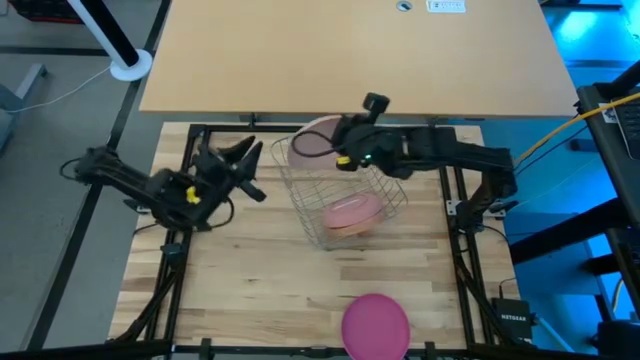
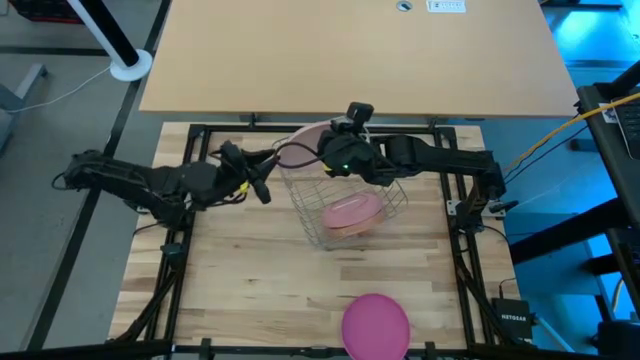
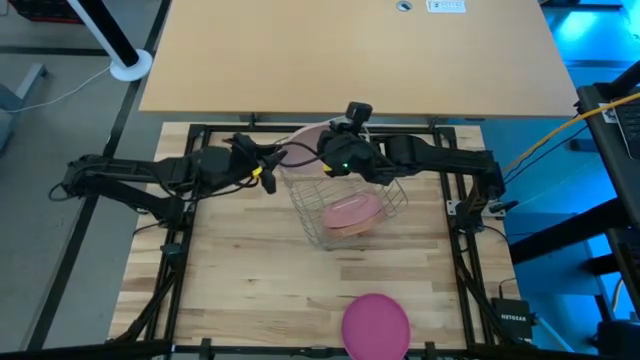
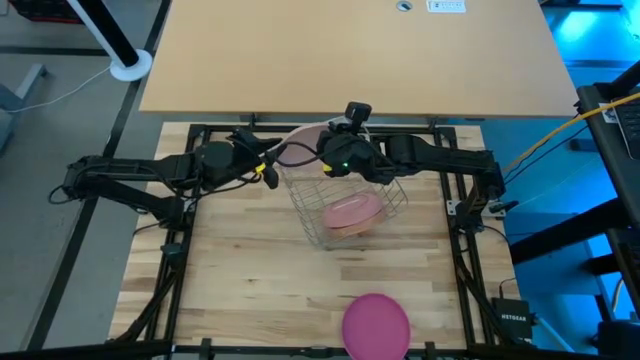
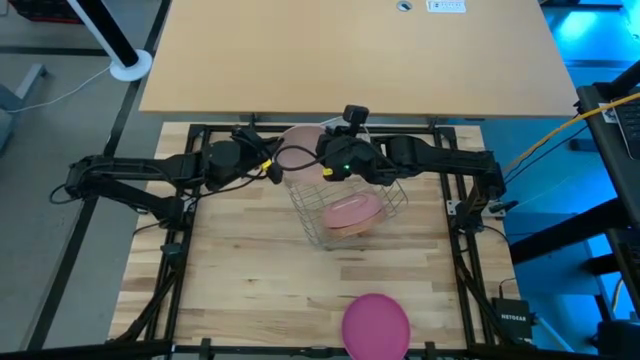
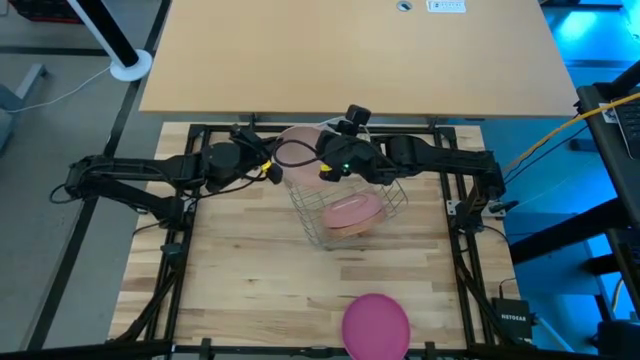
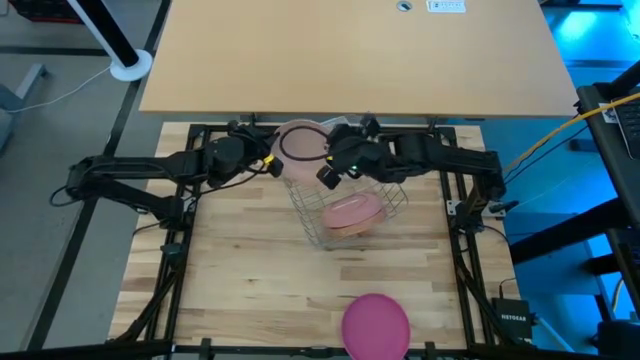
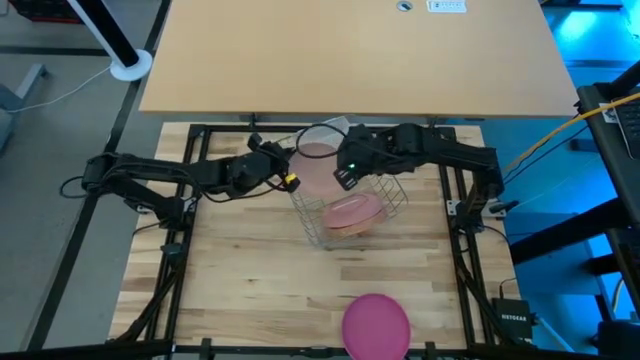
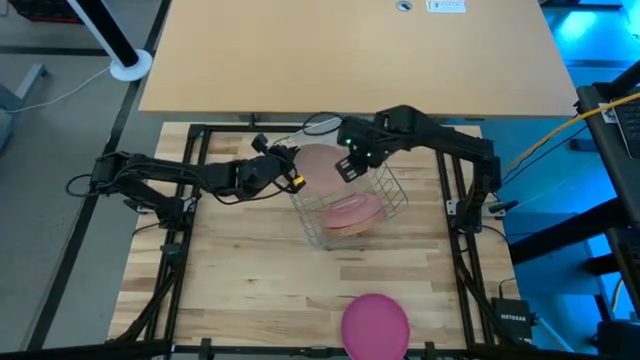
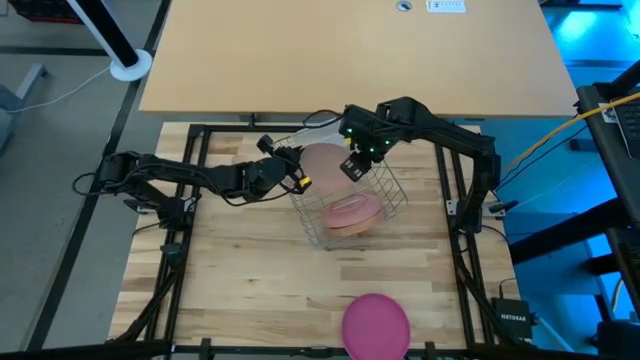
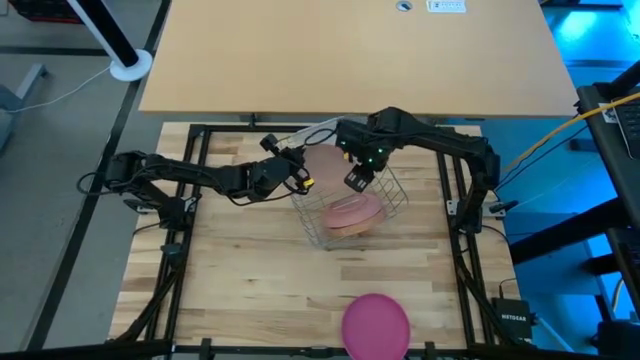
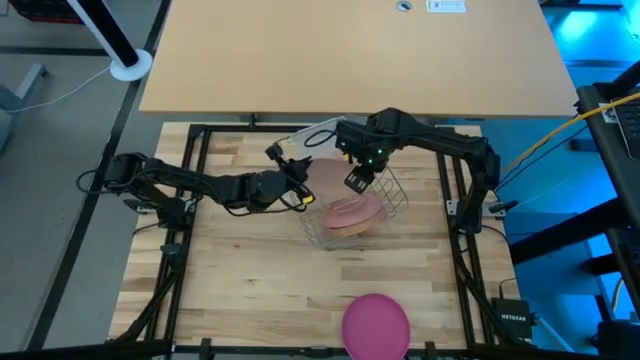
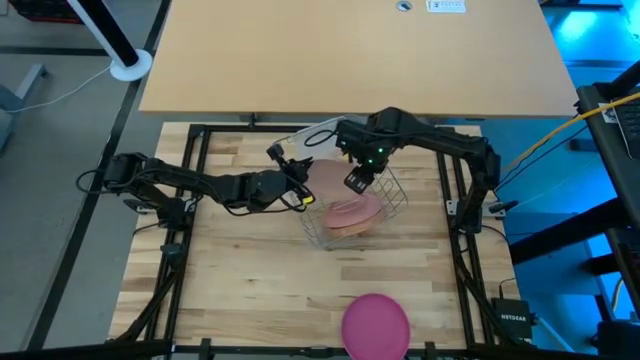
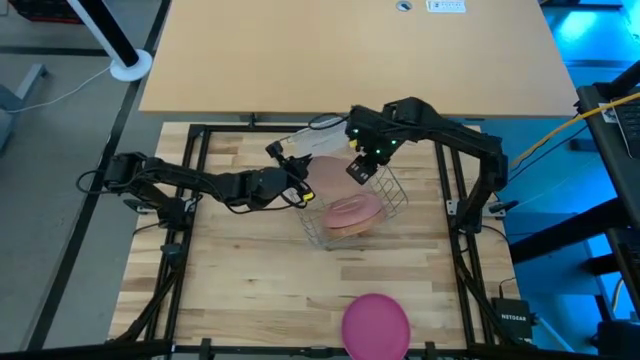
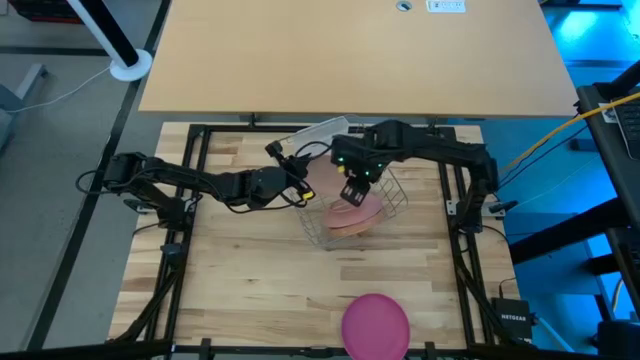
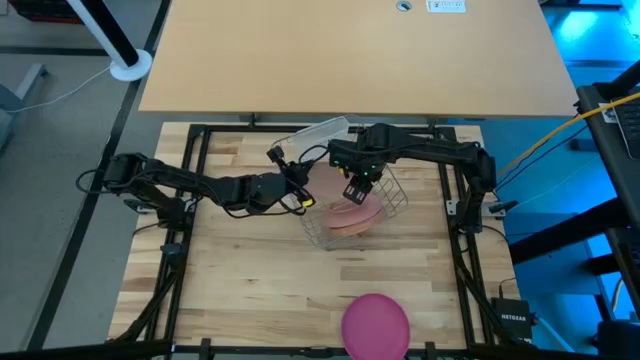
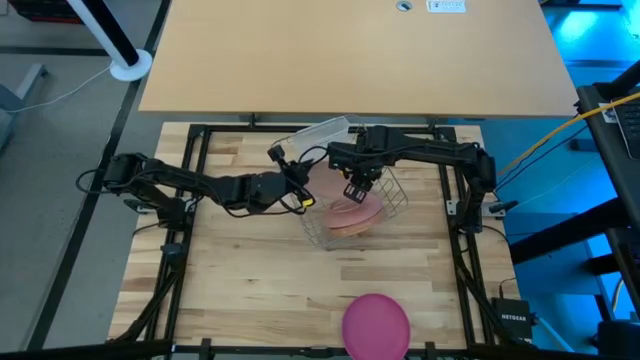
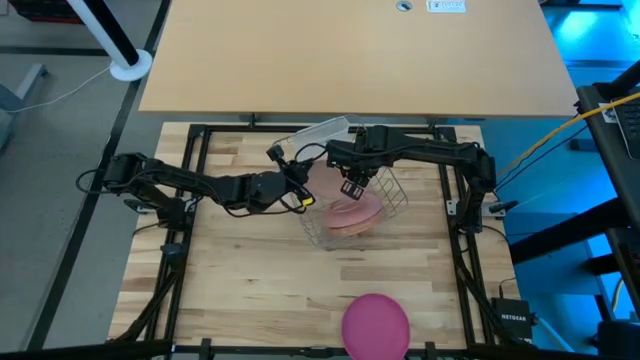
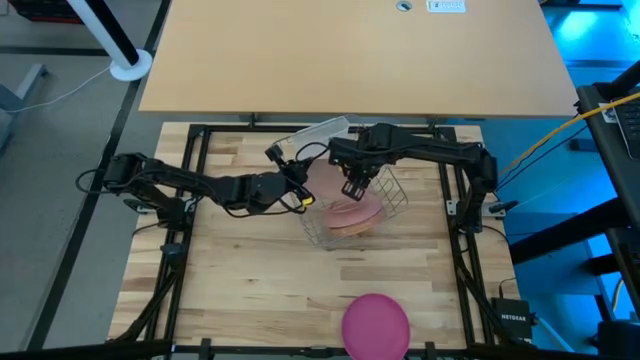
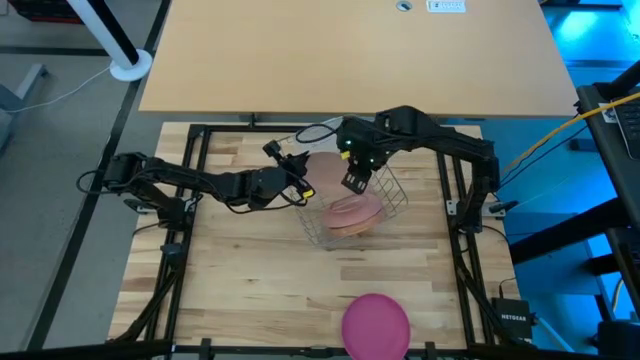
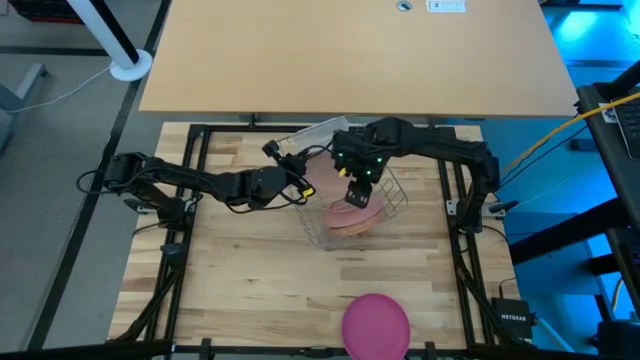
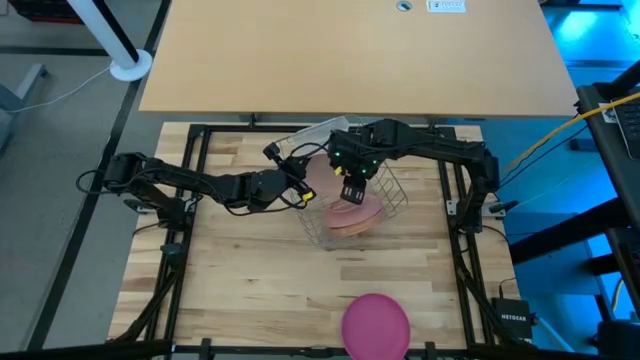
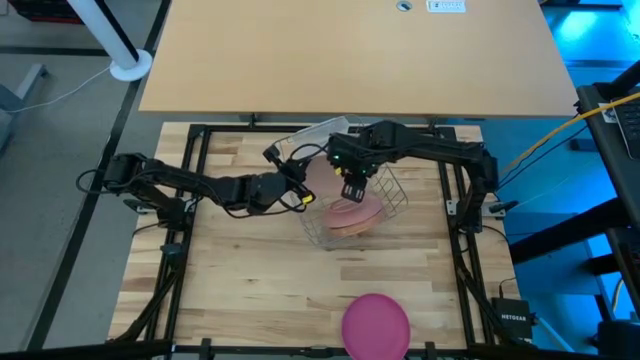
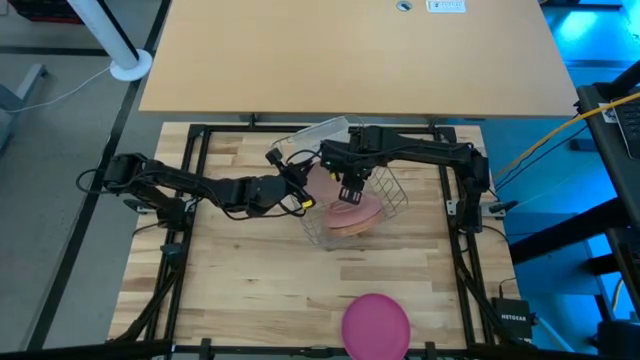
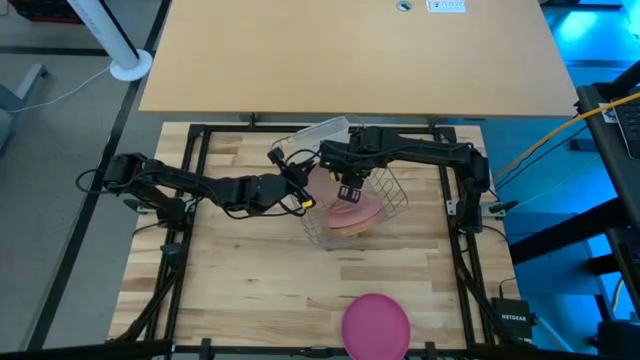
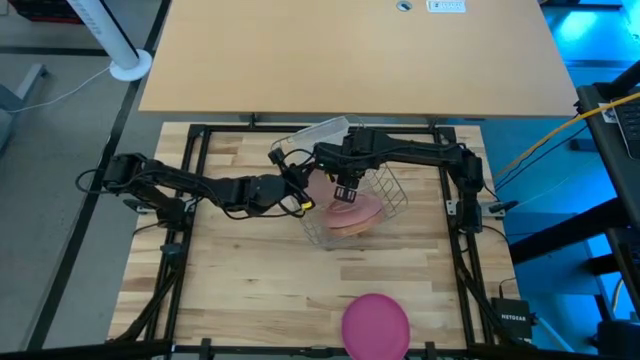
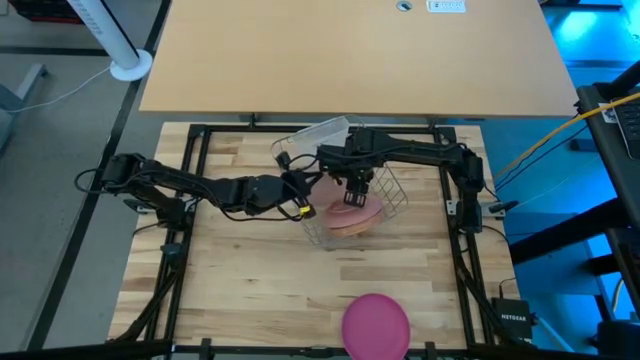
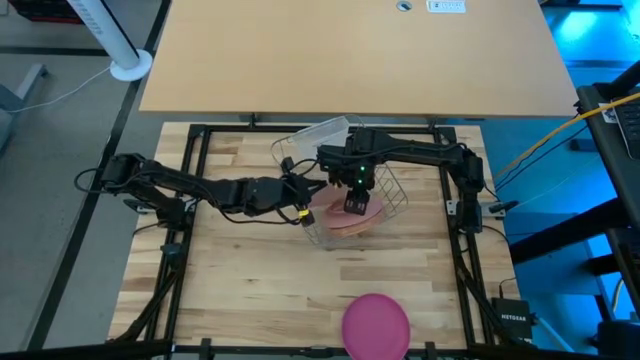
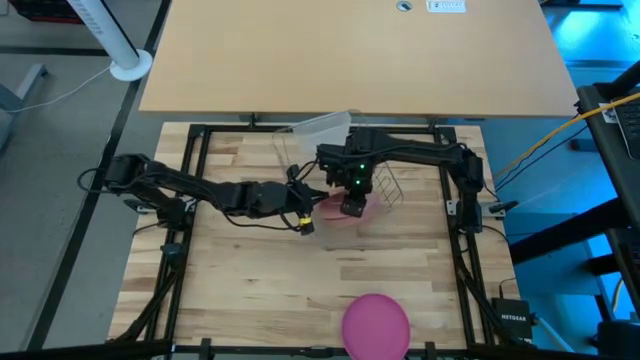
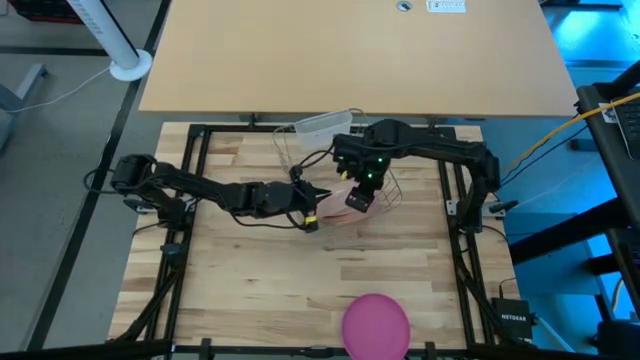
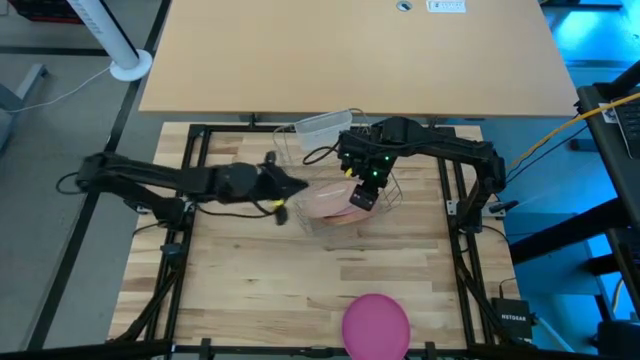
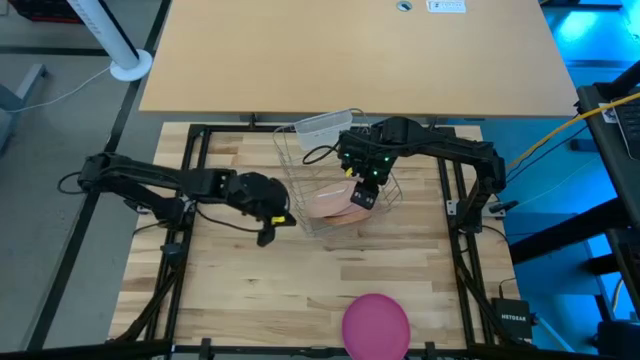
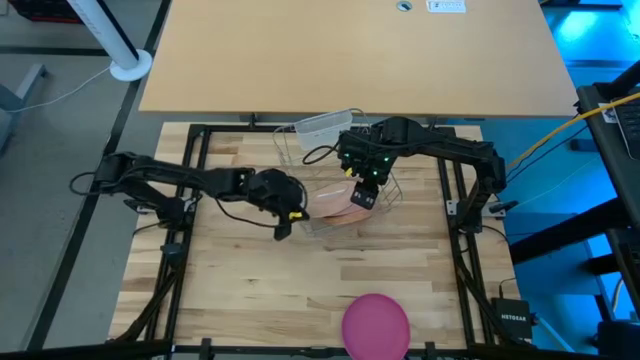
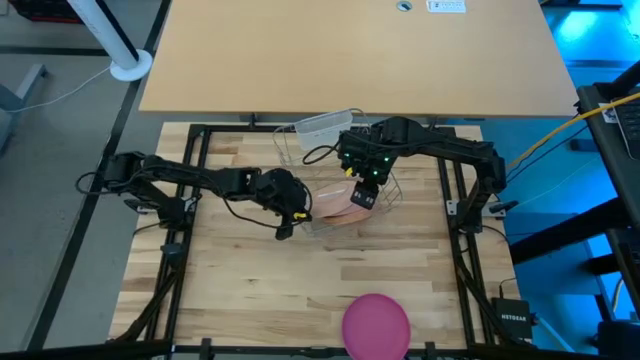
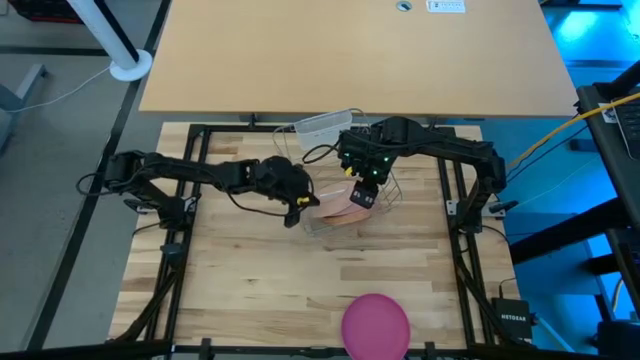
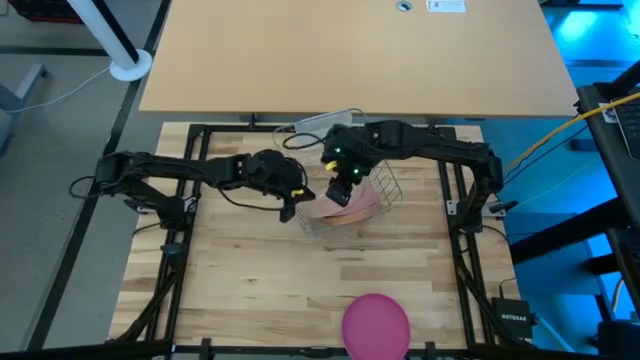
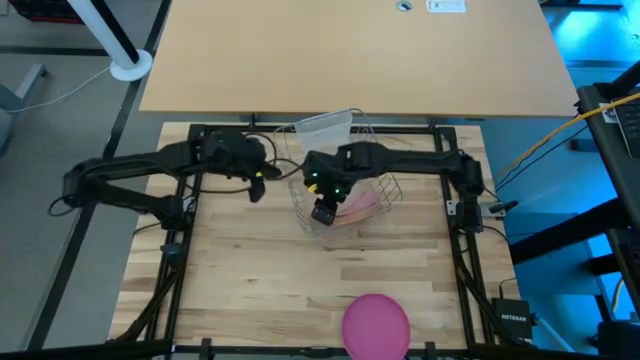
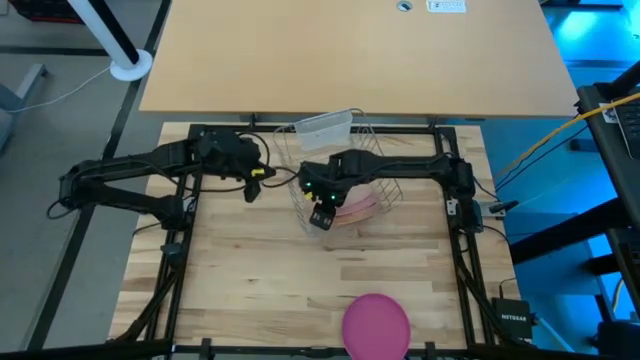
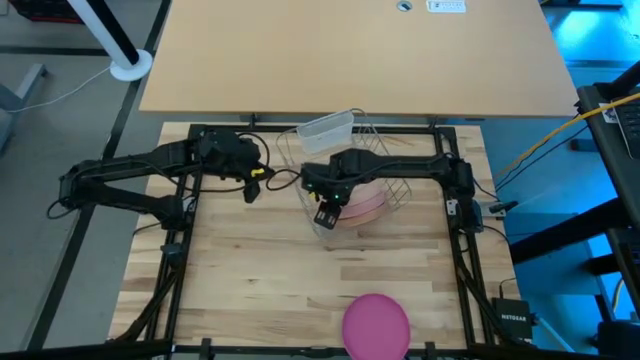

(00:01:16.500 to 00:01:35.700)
Task: Sort dishes
Put the light orange plate in the dish rack

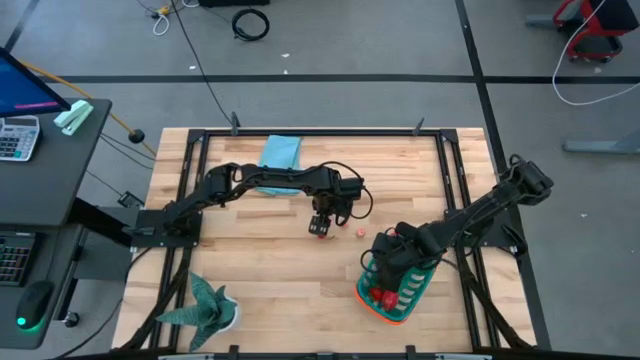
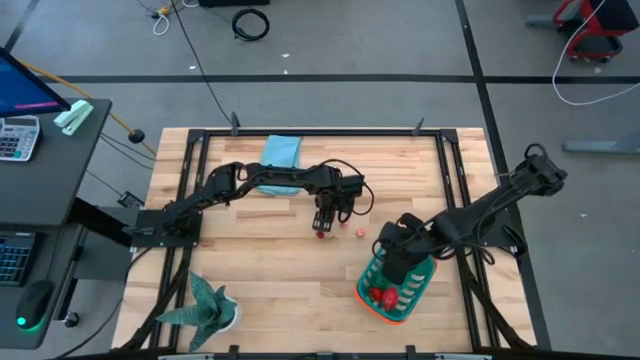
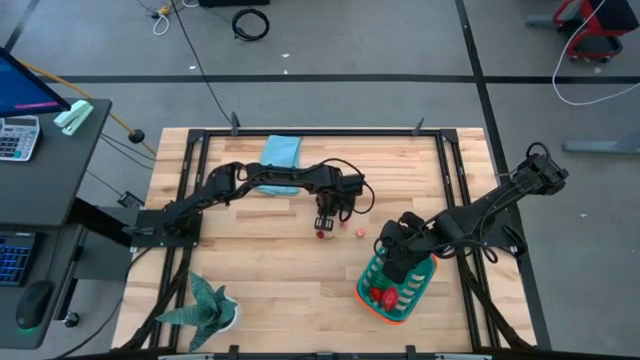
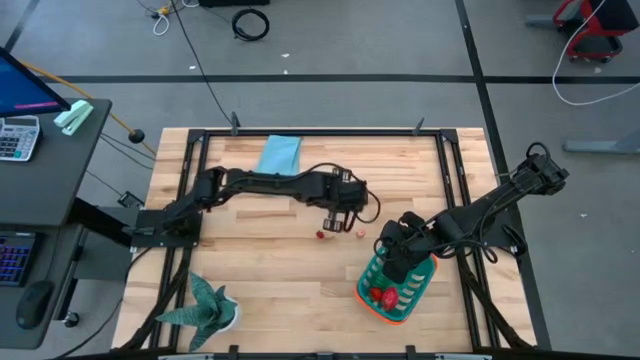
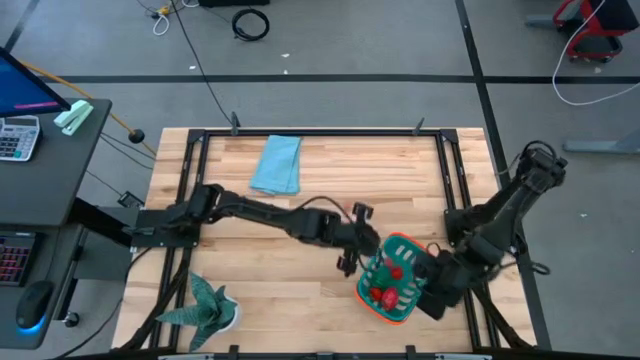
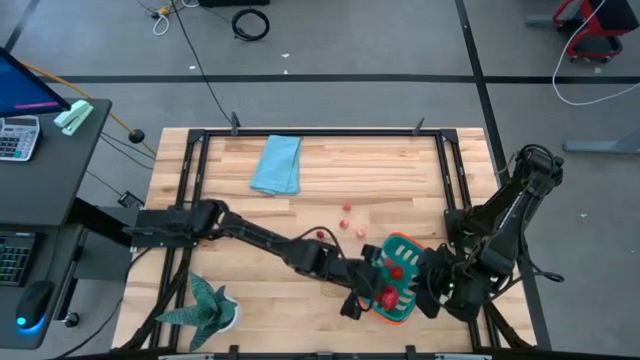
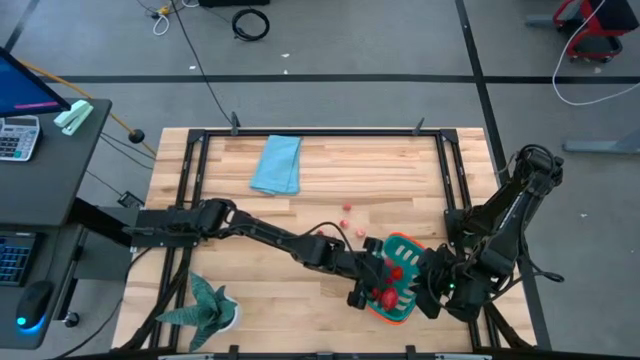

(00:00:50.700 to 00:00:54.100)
Task: Pick and placing Produce into tupperware
Put the red cherry into the blue basket
